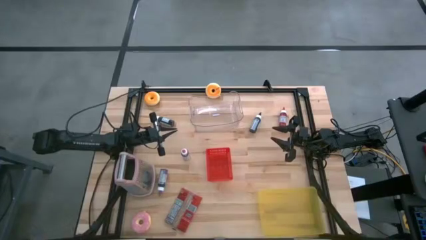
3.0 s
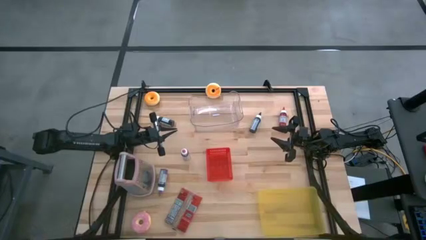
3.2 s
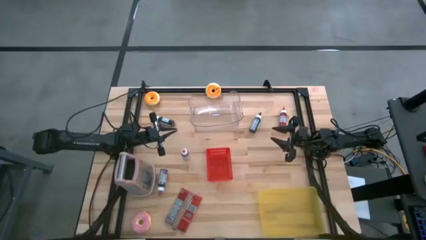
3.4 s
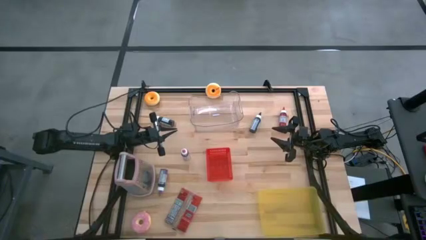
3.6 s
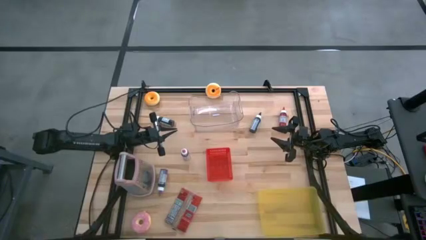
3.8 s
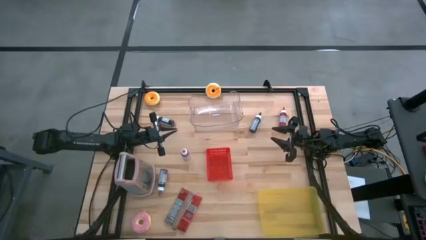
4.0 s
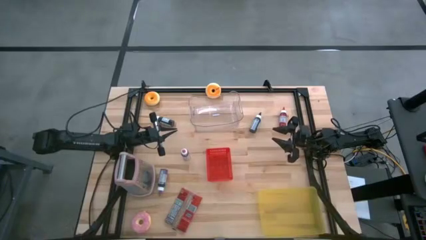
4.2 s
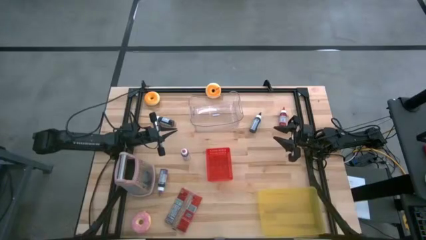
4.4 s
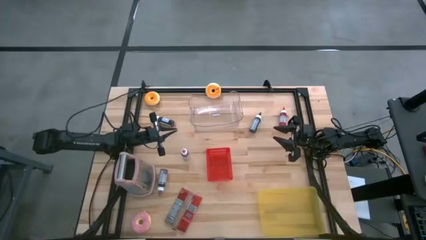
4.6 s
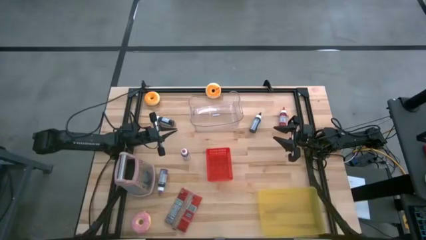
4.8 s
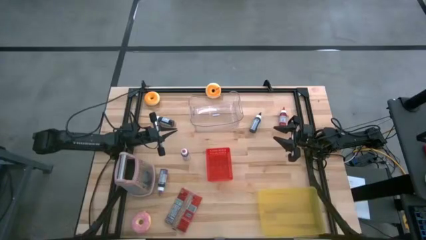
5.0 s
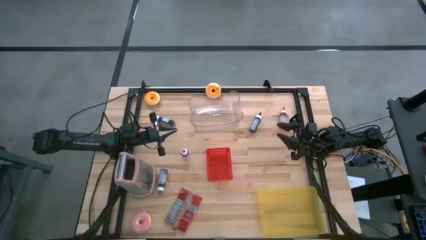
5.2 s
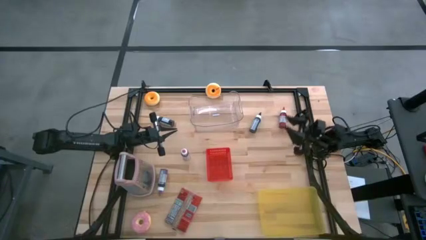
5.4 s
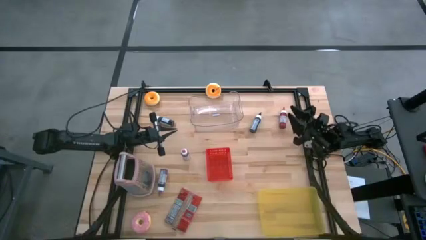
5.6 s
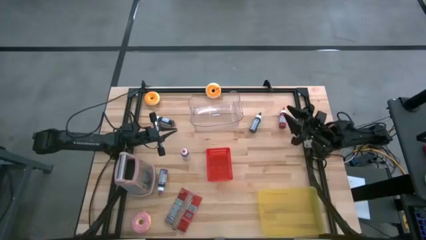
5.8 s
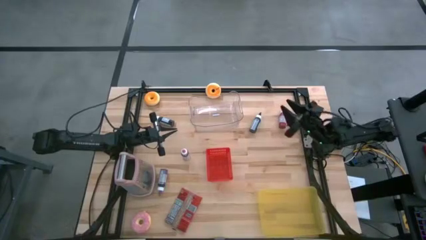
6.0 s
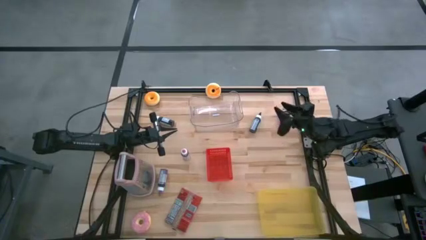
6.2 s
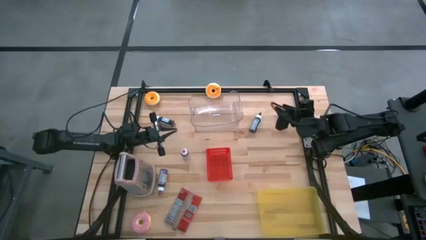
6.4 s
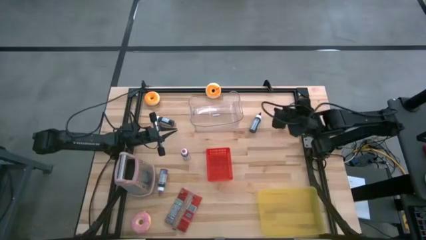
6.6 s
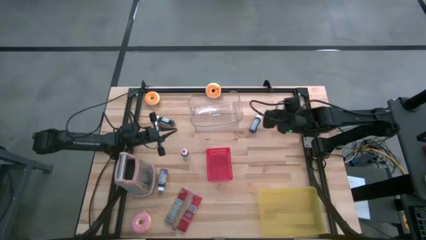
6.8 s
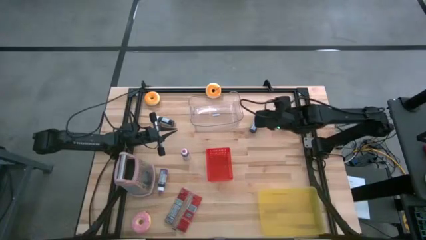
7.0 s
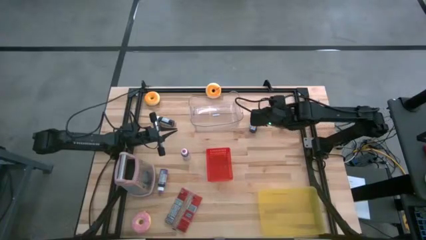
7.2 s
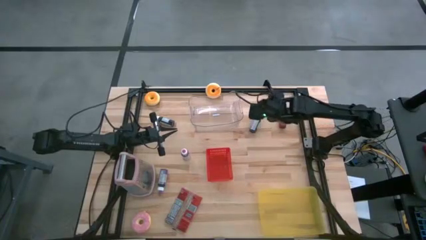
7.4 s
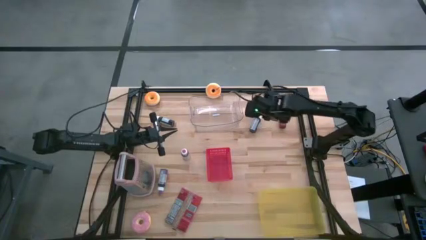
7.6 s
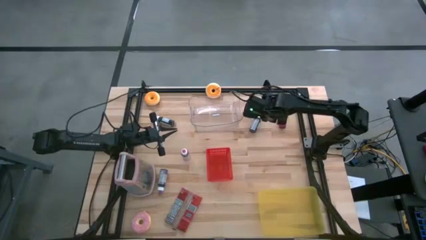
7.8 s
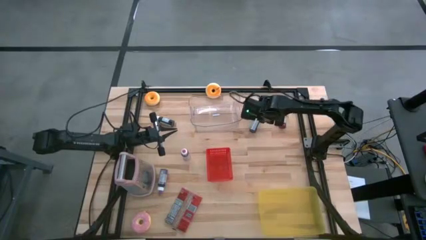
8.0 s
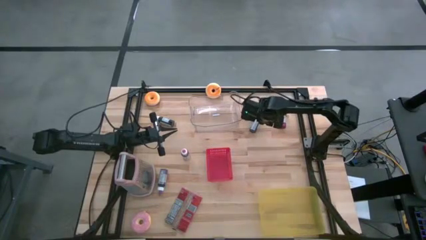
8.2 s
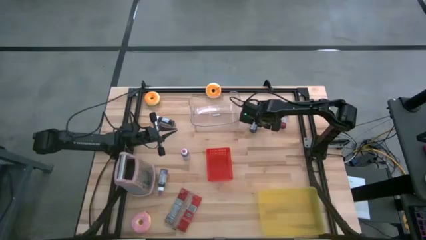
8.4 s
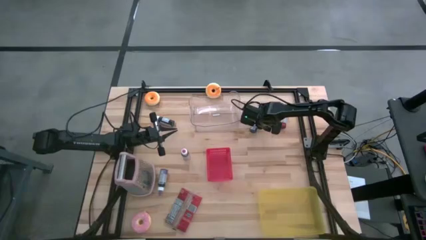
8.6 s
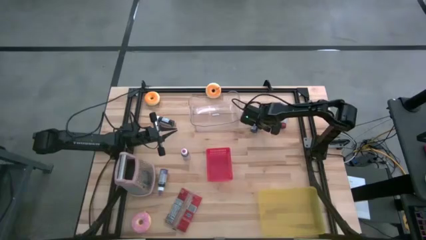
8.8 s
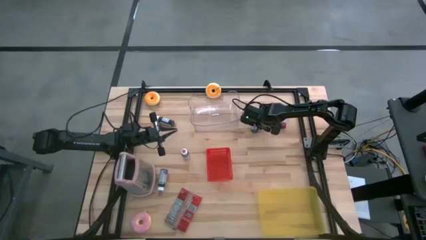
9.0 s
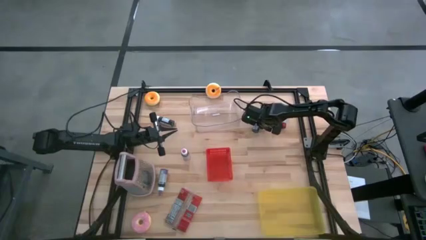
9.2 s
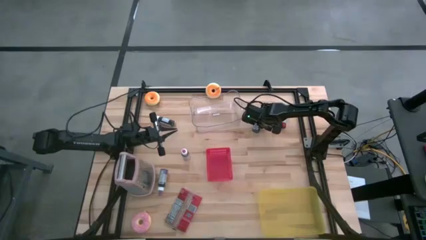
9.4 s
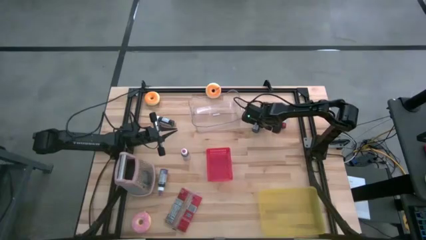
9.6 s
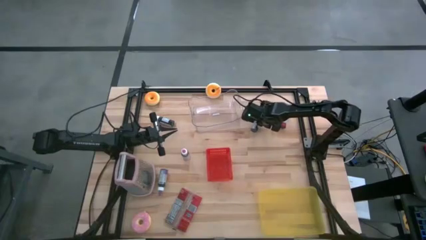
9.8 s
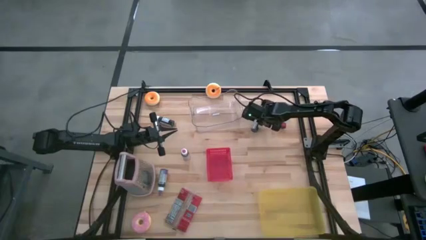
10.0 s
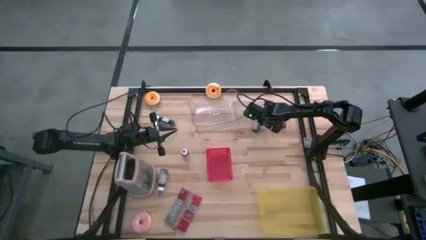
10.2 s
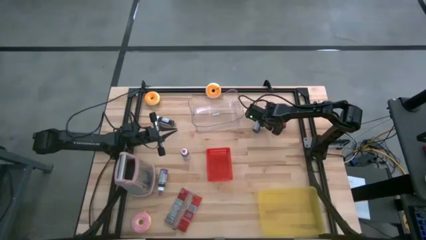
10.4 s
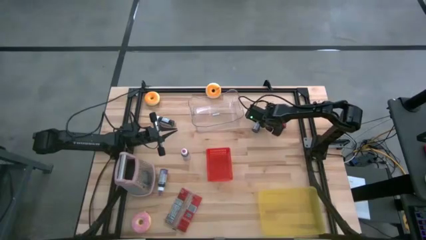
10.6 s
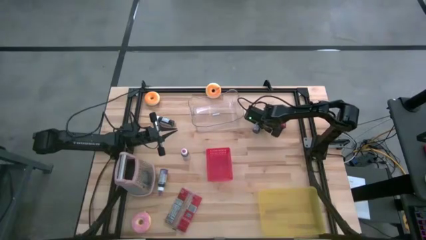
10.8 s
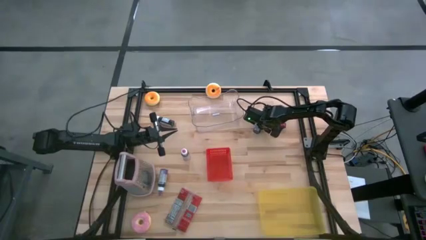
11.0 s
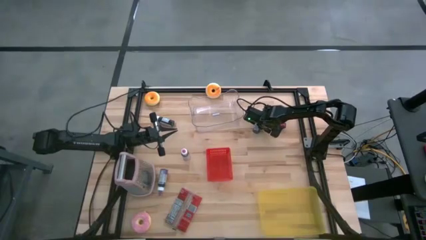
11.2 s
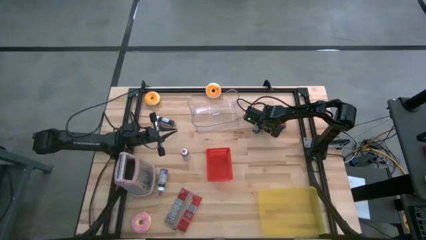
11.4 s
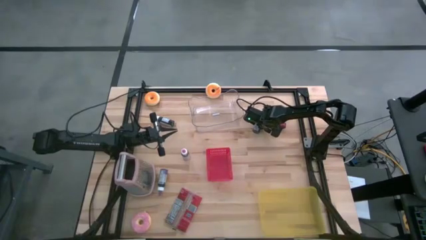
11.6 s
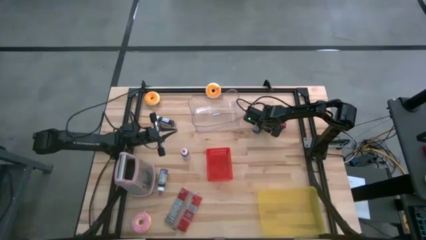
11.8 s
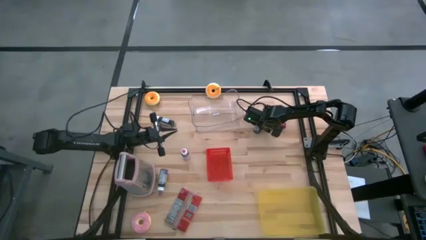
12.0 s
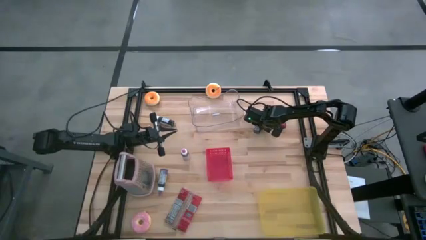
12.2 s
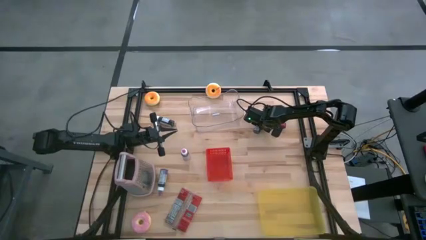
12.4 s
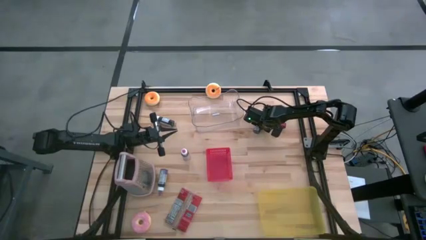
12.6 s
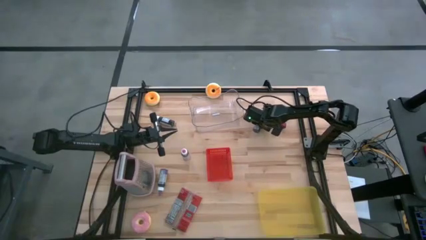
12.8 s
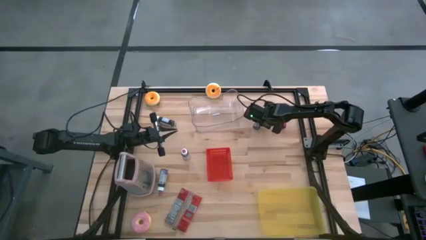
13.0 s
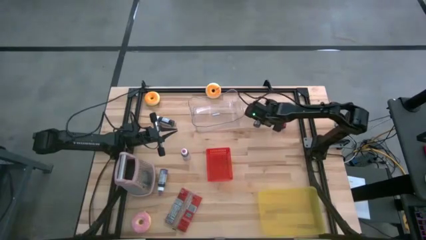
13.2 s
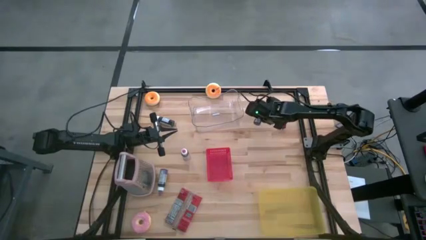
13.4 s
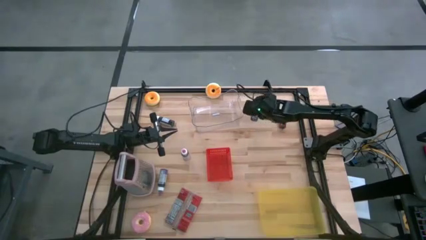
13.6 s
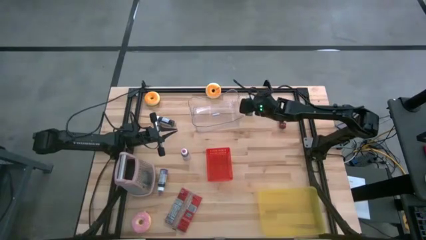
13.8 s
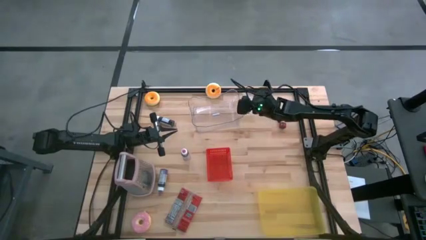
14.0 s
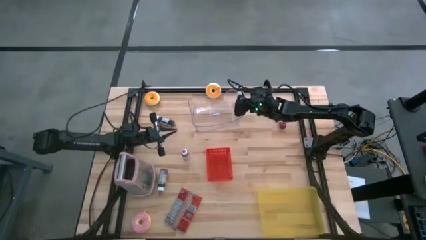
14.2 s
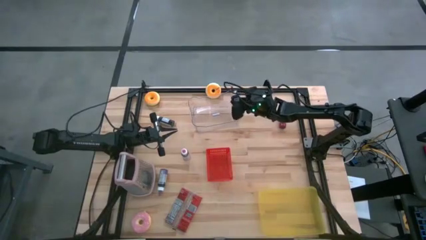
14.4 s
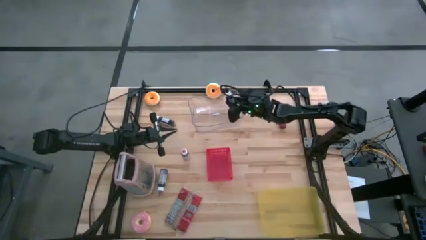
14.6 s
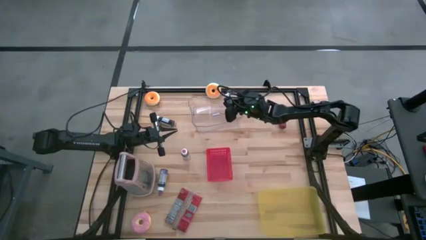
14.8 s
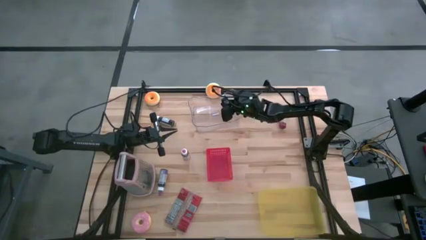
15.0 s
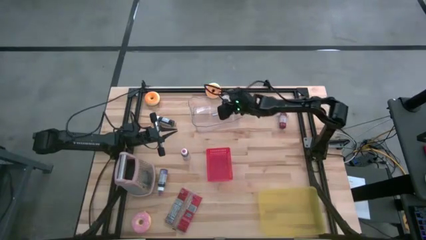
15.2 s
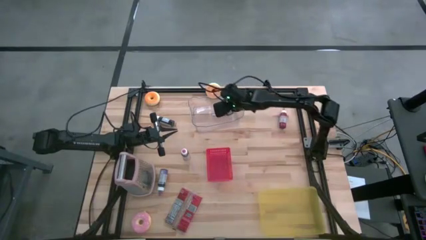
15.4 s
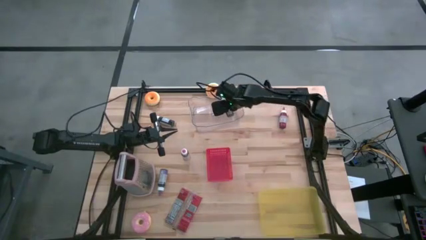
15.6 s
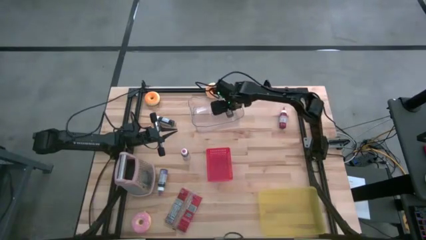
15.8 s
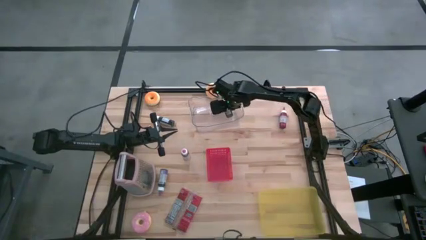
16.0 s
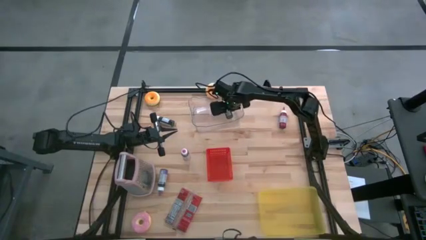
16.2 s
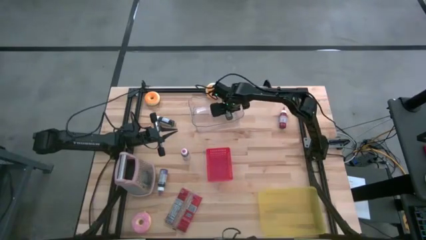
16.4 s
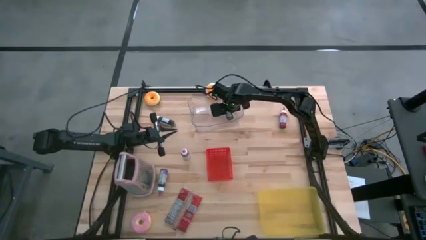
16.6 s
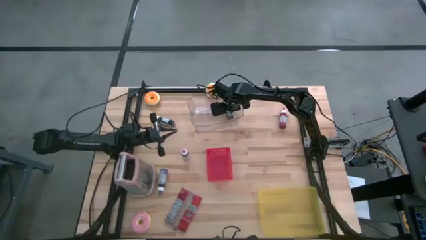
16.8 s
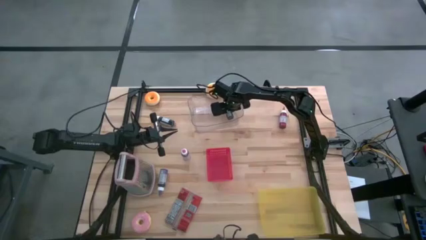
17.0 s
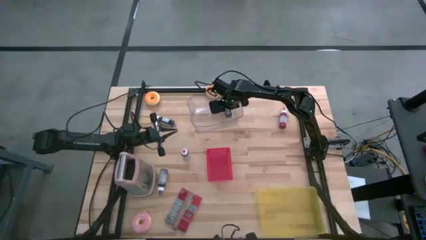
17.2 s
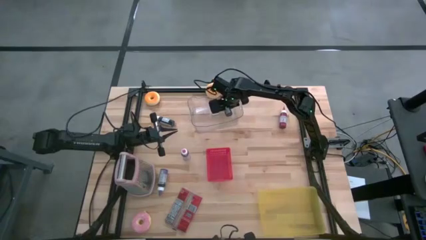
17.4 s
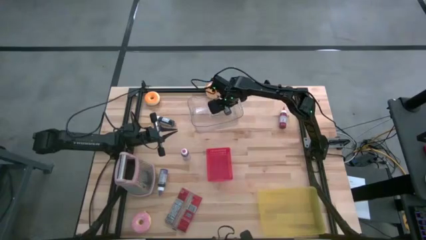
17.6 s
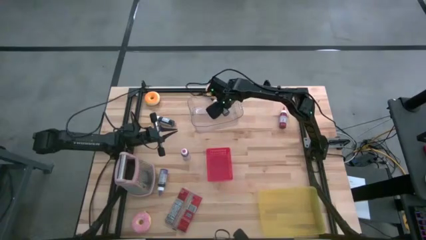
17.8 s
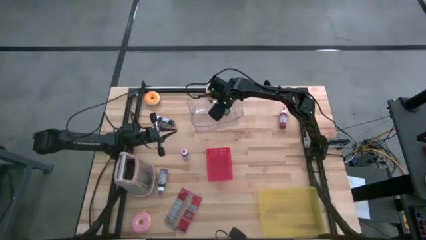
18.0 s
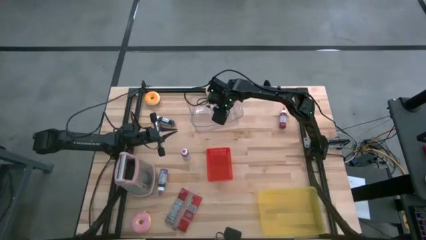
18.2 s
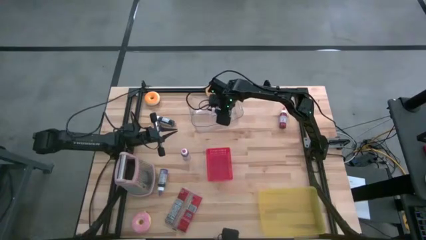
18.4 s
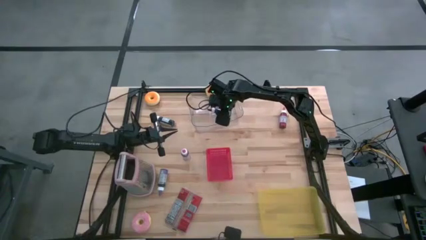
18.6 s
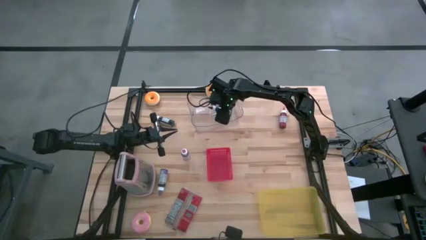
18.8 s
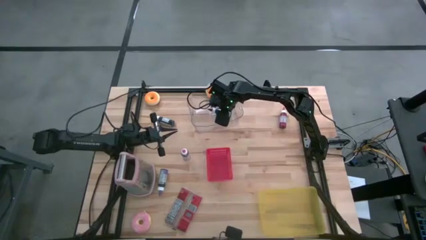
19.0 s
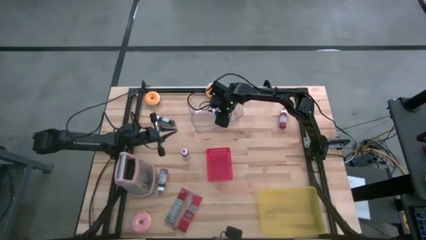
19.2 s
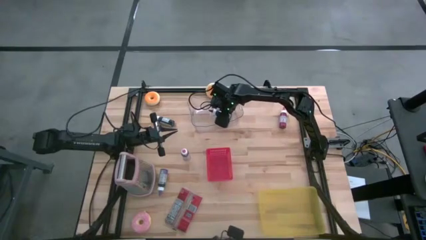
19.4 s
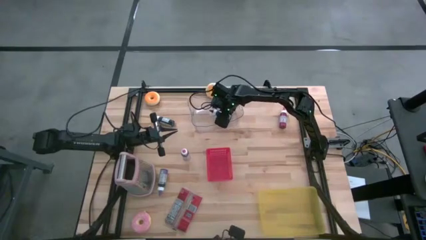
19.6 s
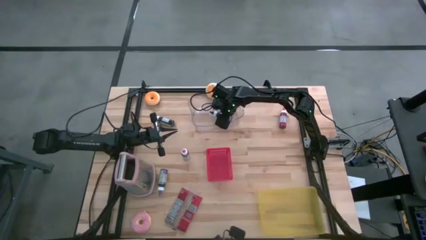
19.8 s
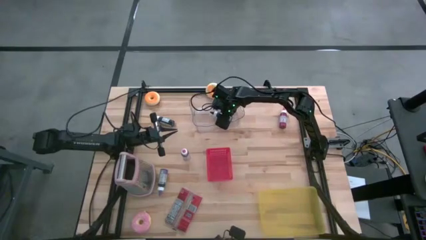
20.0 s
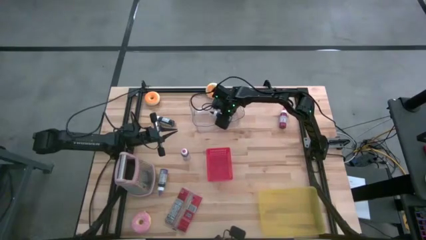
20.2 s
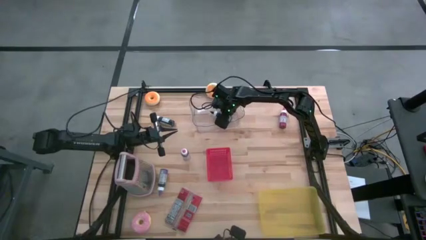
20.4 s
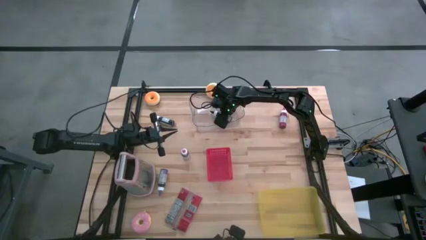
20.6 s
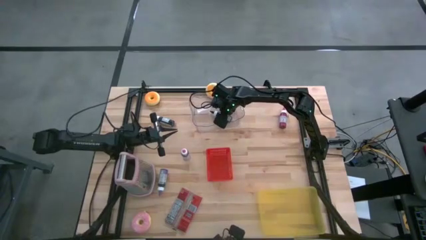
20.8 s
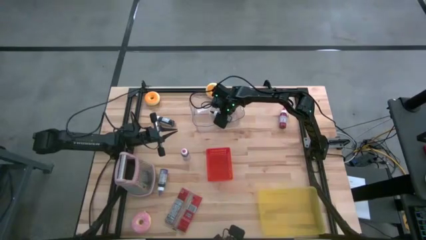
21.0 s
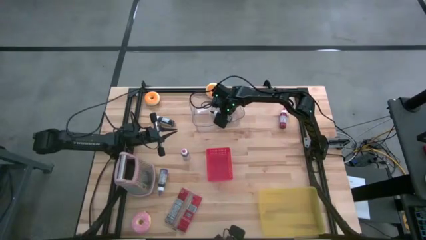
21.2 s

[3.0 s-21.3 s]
Task: Pick & Place Food Item
Put the right black food coloring bottle into the transparent bin
